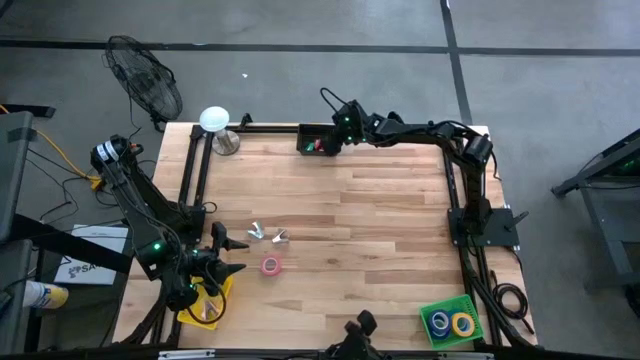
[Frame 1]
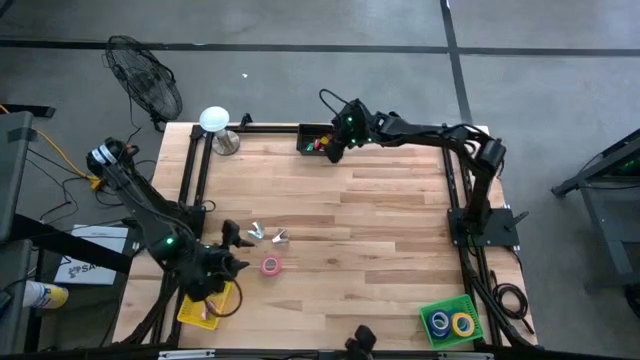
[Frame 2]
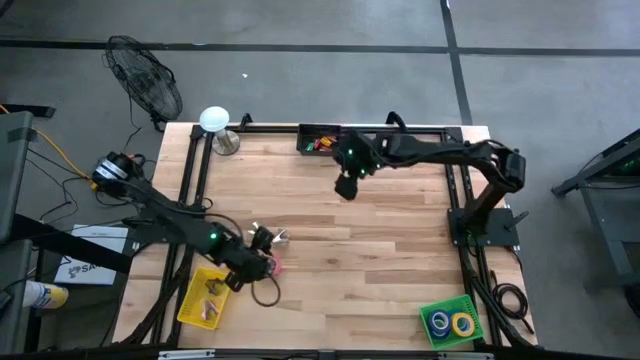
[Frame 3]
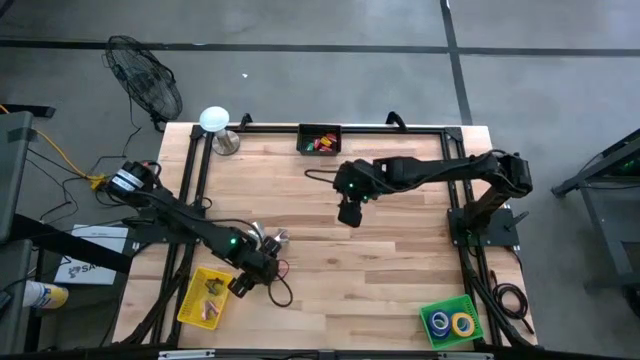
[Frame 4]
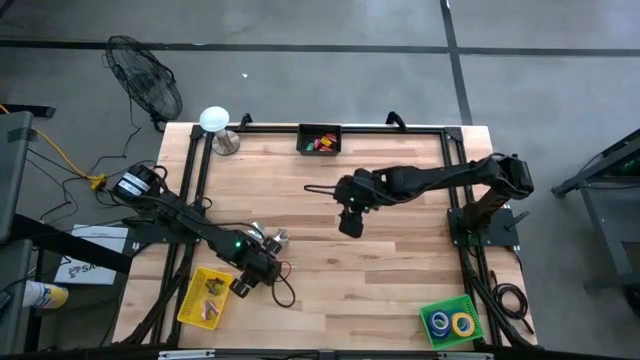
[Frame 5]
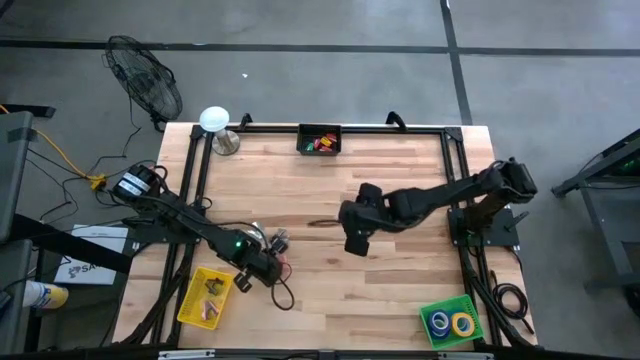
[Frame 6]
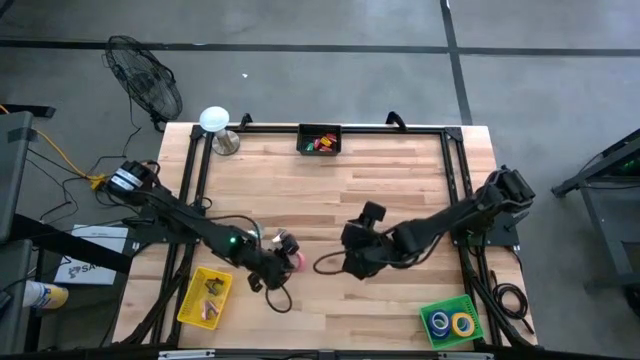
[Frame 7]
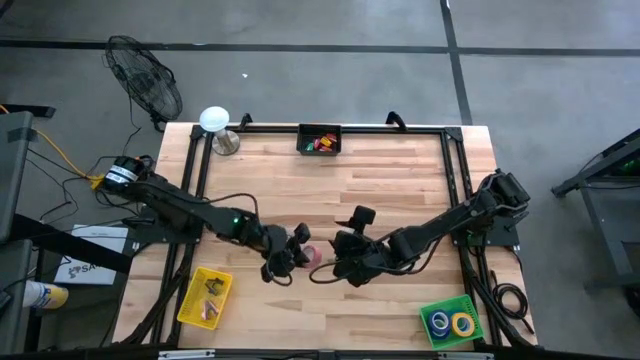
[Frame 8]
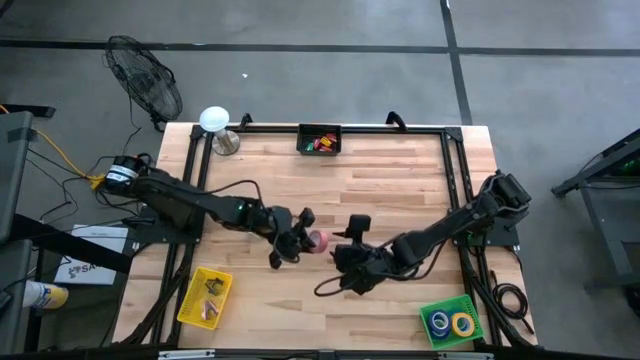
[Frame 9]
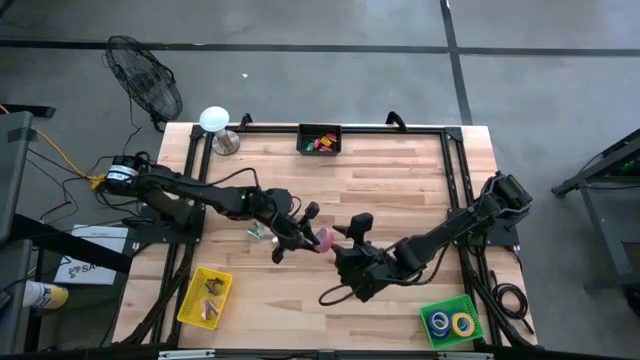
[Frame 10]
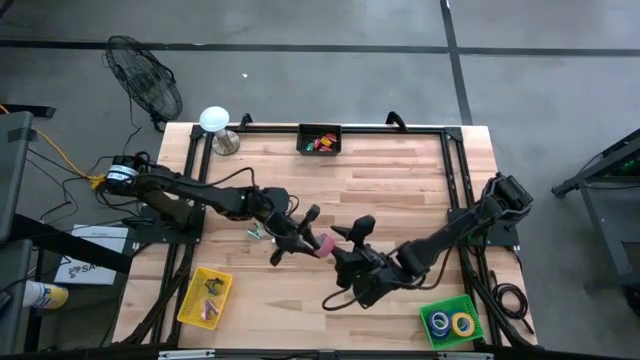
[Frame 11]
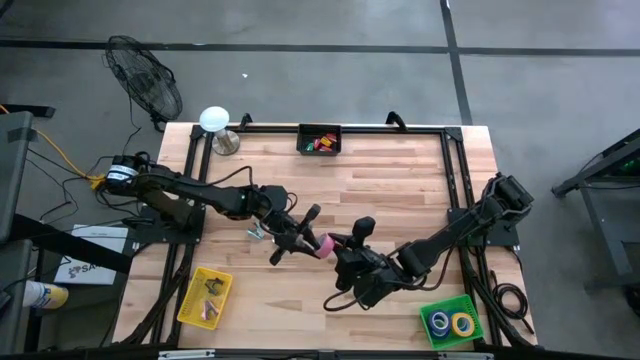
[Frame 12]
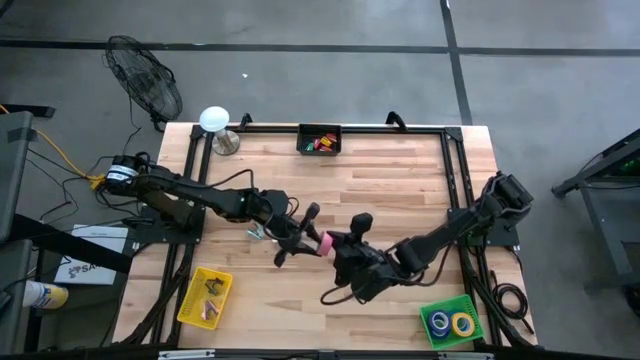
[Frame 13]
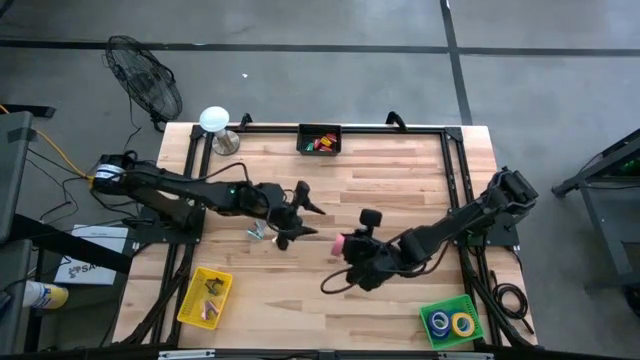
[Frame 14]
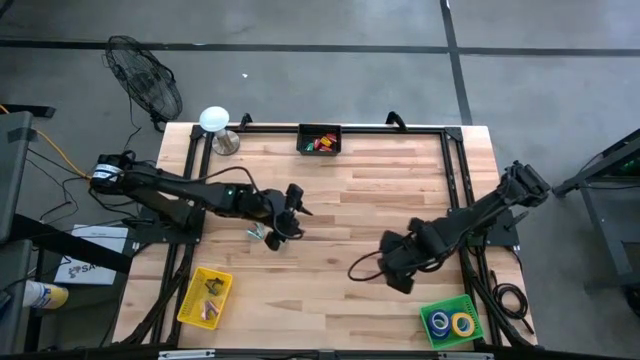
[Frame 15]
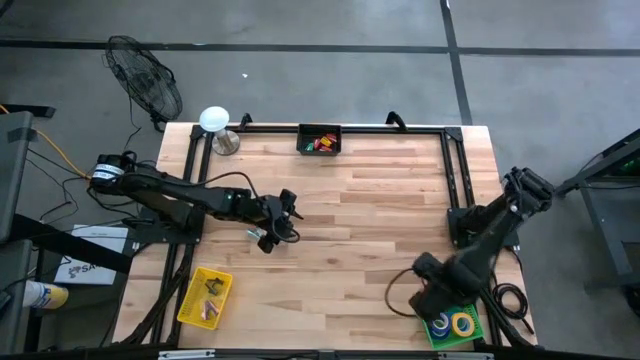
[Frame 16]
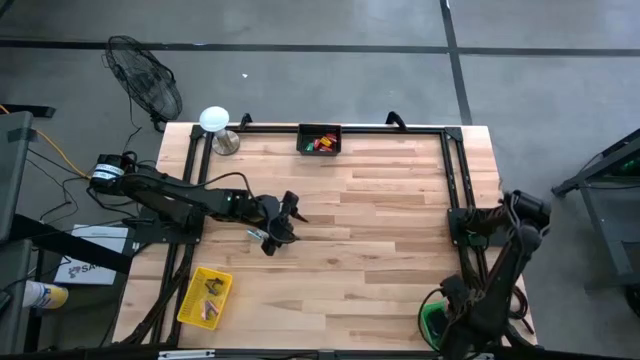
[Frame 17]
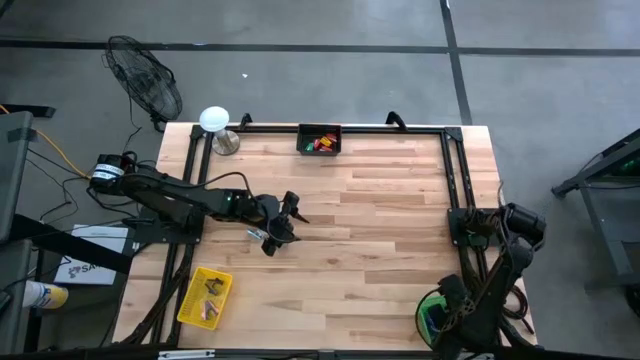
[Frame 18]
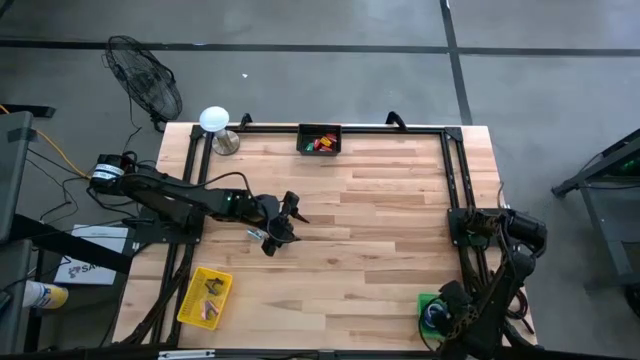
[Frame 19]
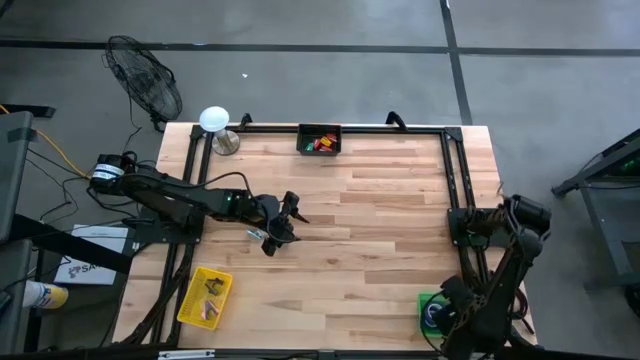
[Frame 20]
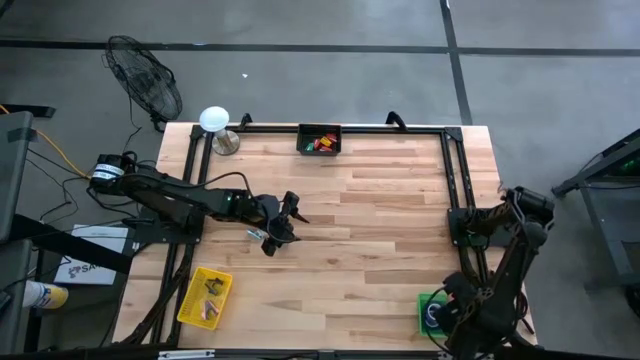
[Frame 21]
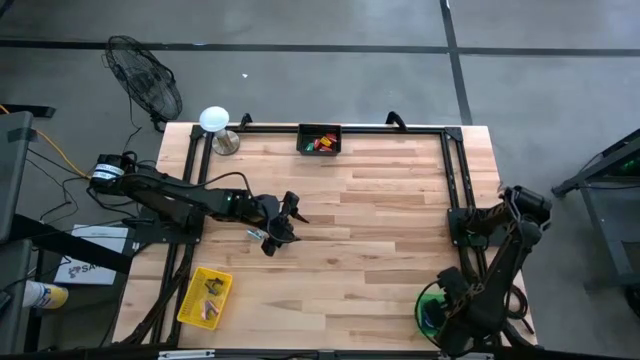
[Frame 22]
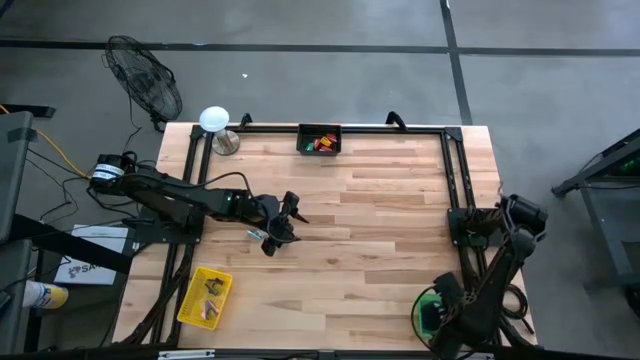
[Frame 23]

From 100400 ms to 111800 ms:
Task: Pick and place Stapler, Stapler remover, tape
Put the pink tape into the green bin

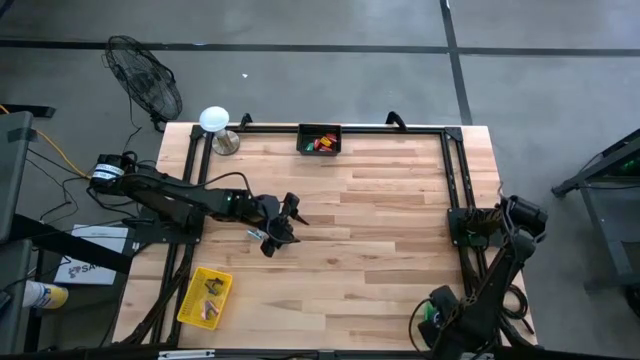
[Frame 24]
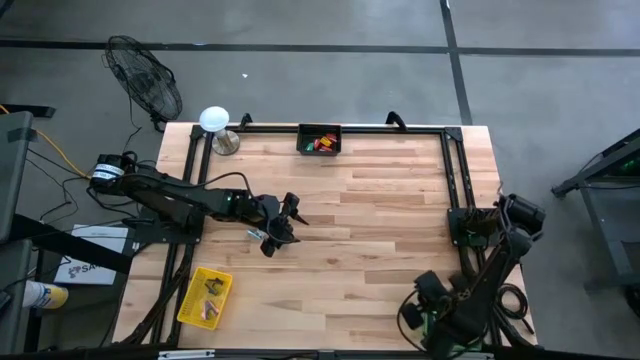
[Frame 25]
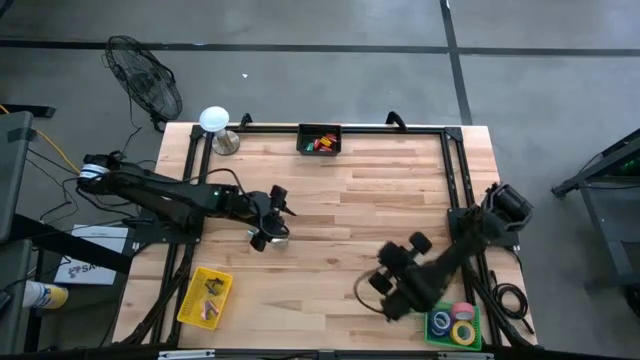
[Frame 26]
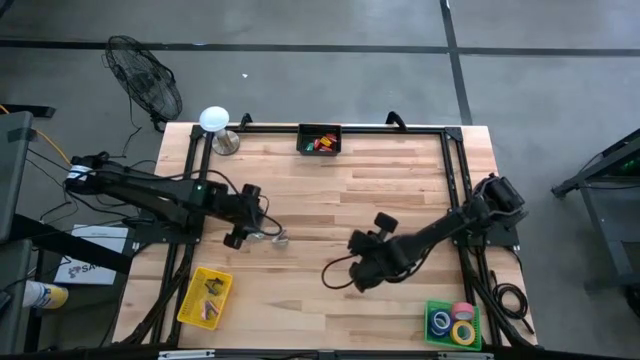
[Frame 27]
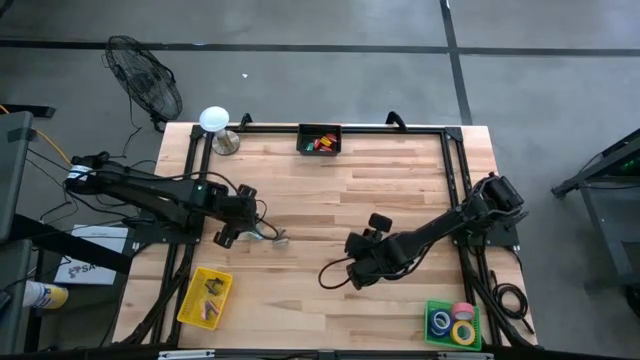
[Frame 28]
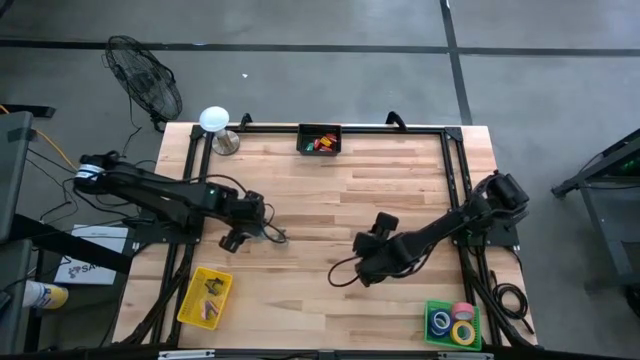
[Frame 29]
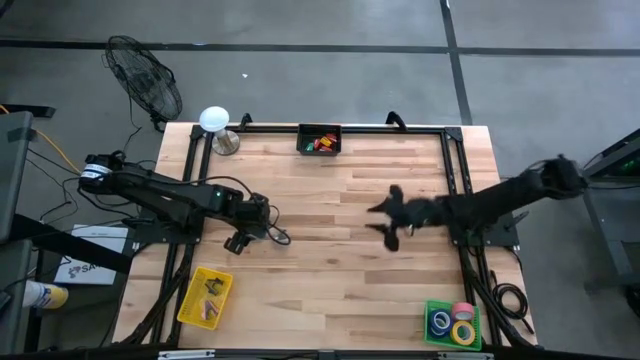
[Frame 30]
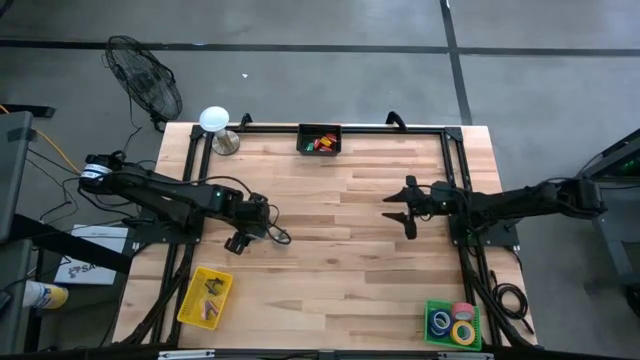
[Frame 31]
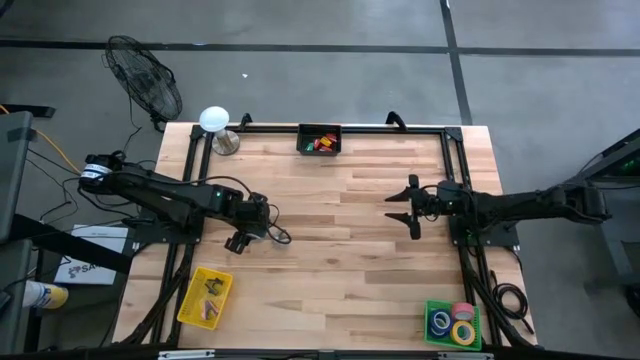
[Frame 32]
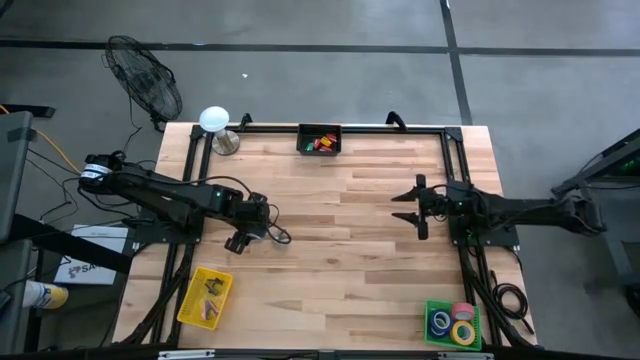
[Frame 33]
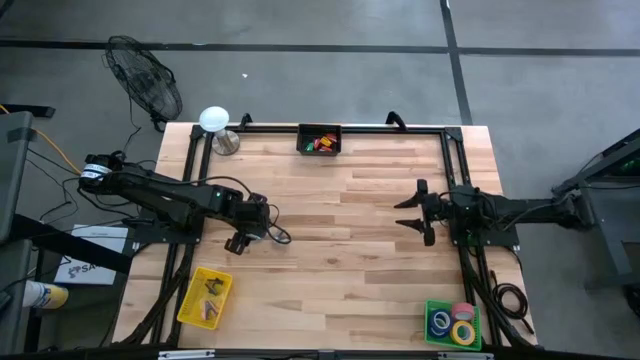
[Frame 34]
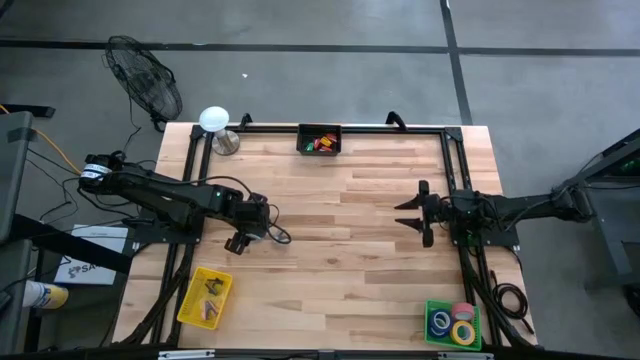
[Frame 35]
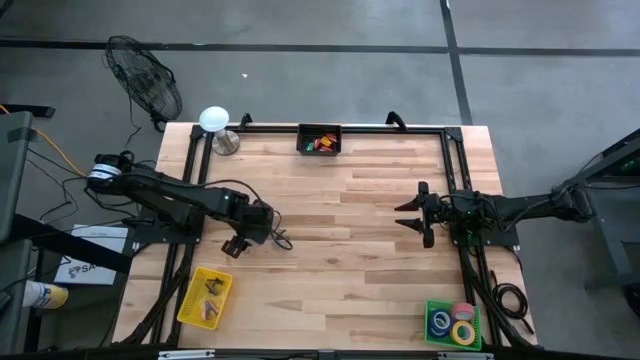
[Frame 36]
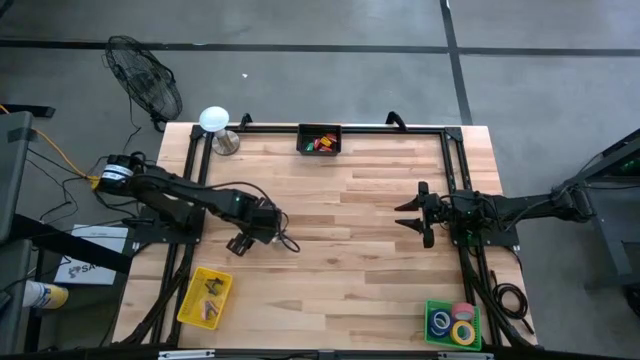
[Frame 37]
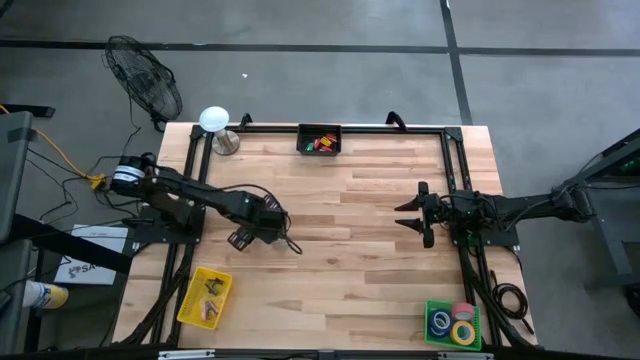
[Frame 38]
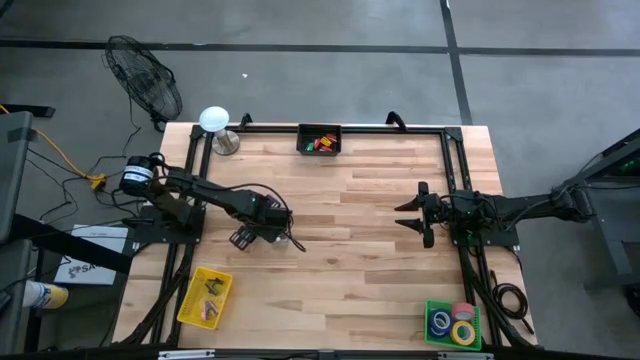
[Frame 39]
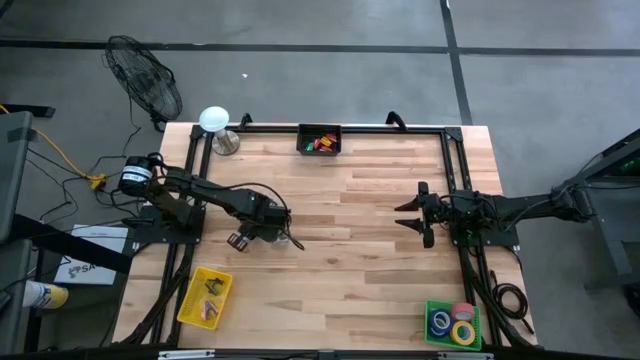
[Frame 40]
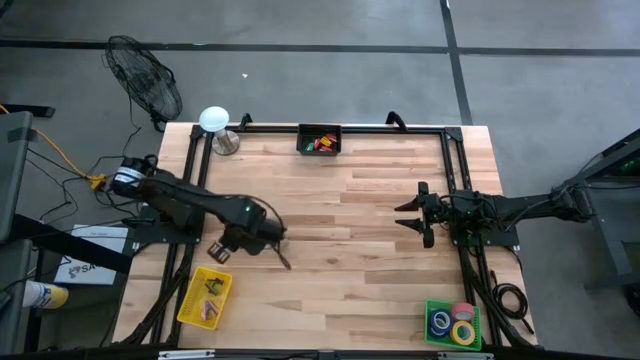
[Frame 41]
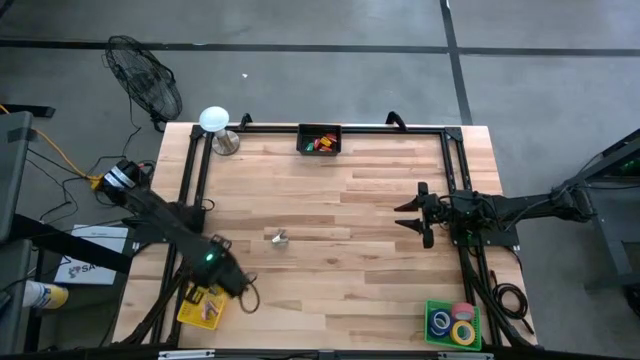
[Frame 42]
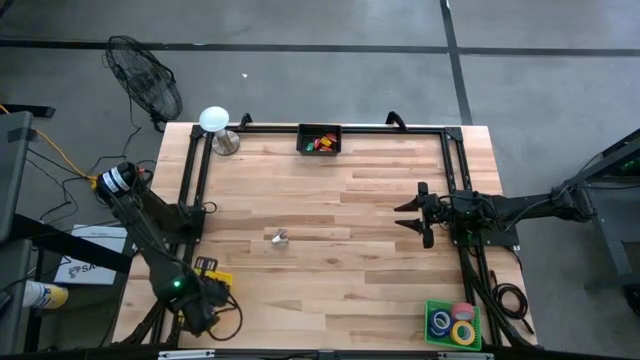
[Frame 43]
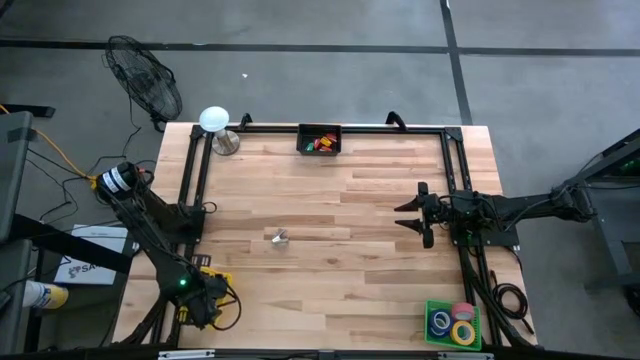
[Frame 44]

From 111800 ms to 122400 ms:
Put the blue staple remover into the yellow bin
